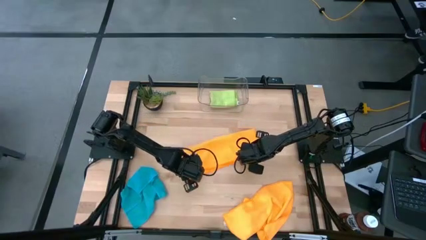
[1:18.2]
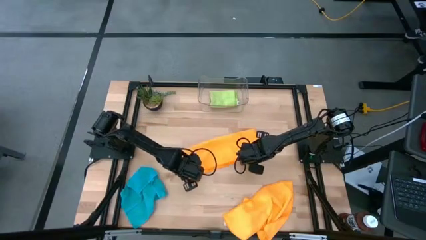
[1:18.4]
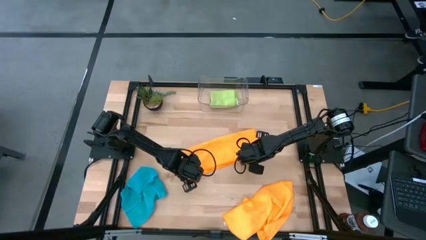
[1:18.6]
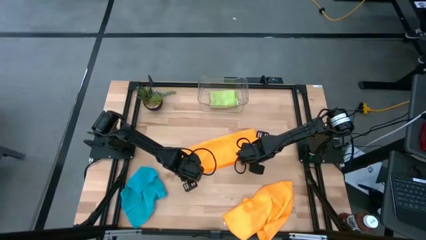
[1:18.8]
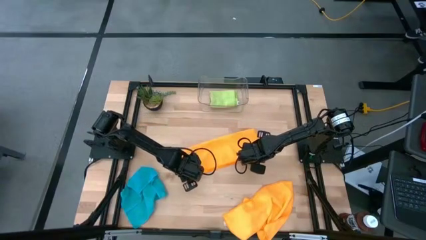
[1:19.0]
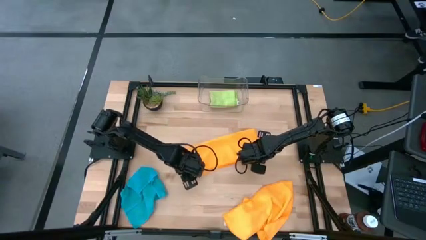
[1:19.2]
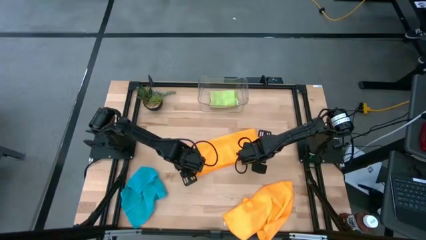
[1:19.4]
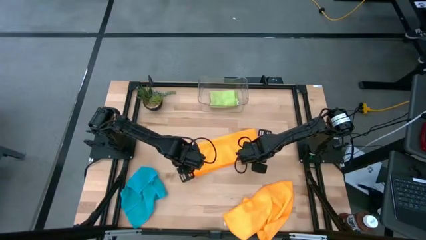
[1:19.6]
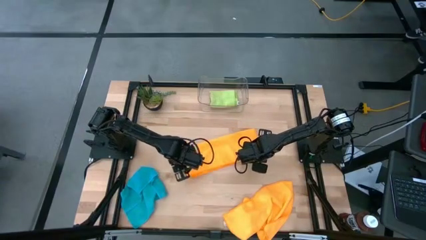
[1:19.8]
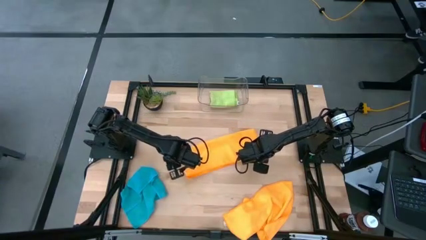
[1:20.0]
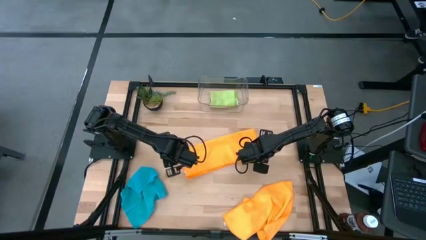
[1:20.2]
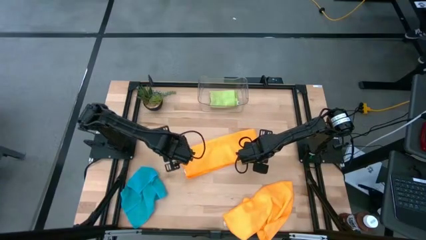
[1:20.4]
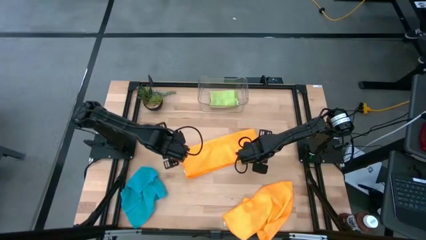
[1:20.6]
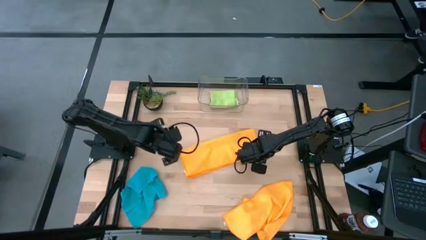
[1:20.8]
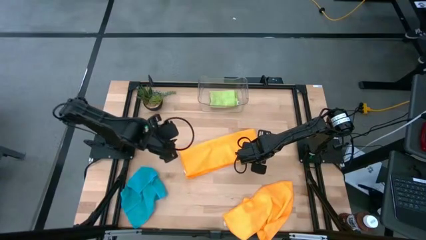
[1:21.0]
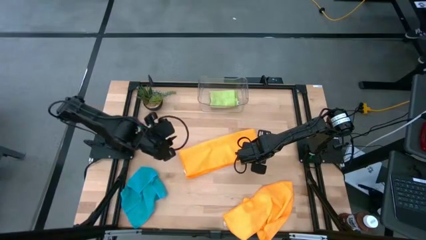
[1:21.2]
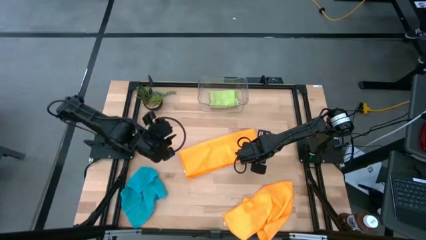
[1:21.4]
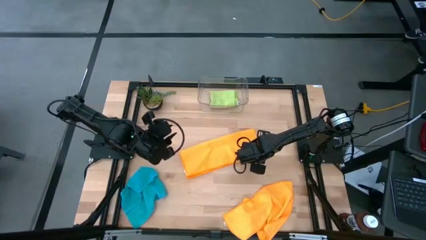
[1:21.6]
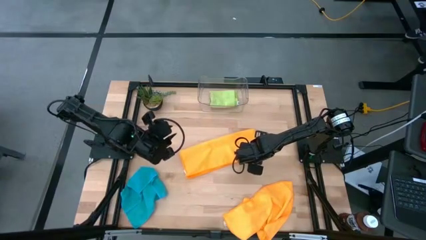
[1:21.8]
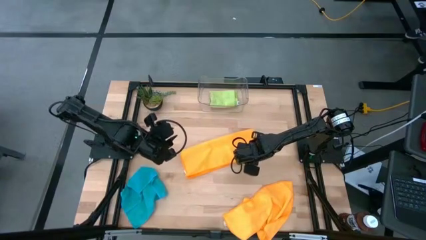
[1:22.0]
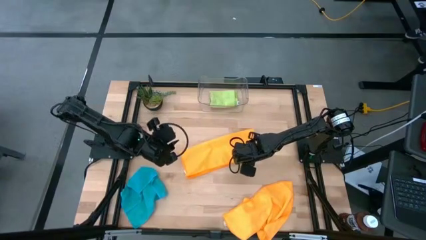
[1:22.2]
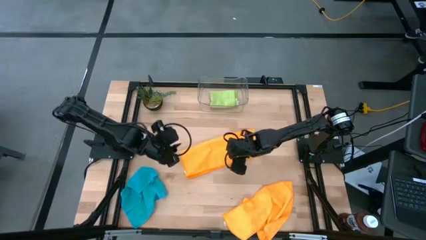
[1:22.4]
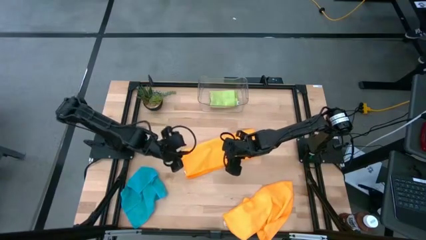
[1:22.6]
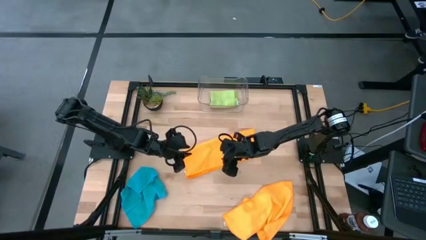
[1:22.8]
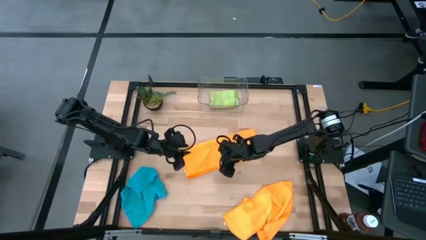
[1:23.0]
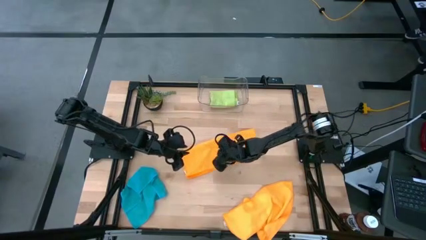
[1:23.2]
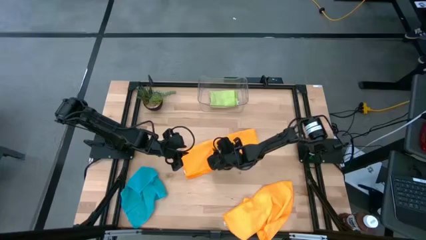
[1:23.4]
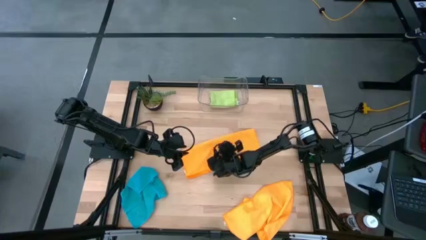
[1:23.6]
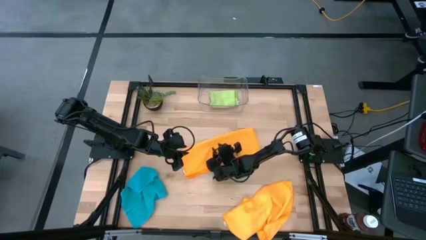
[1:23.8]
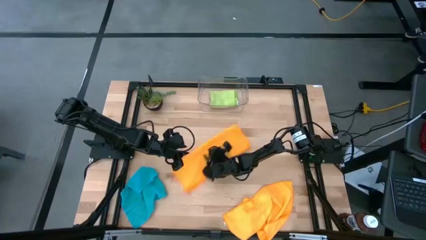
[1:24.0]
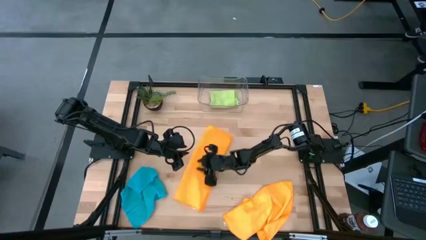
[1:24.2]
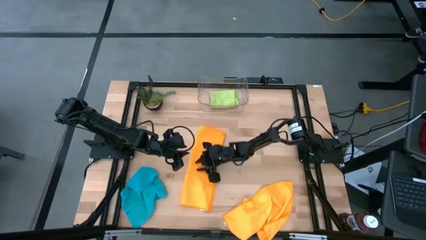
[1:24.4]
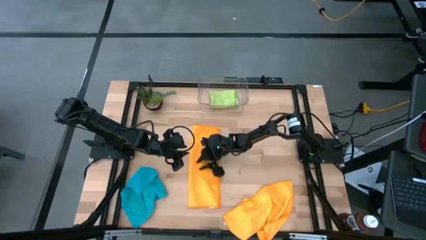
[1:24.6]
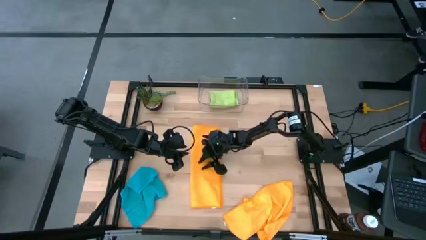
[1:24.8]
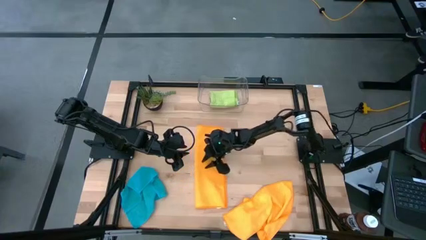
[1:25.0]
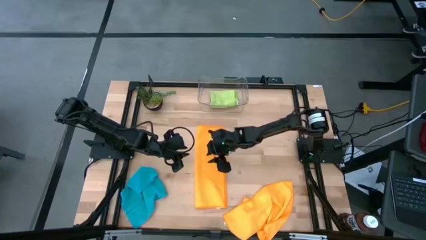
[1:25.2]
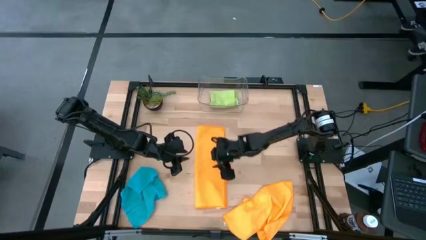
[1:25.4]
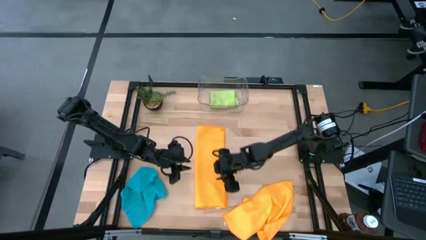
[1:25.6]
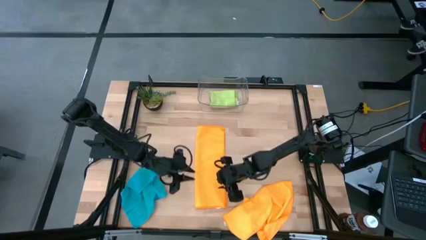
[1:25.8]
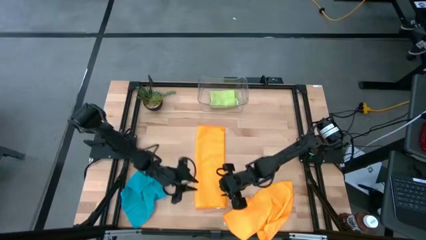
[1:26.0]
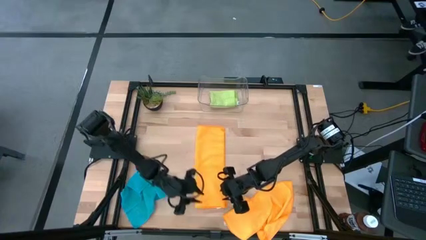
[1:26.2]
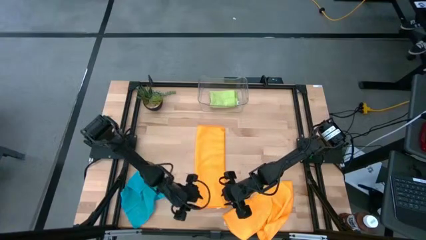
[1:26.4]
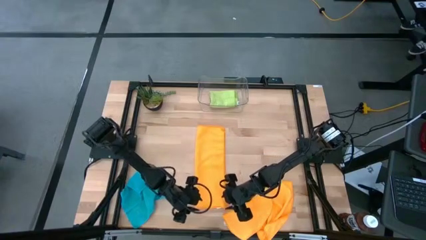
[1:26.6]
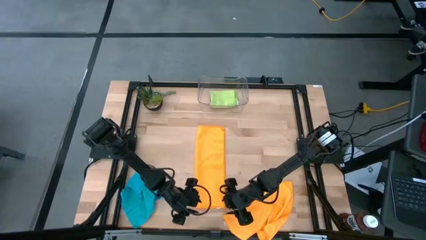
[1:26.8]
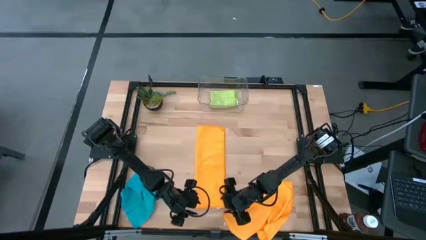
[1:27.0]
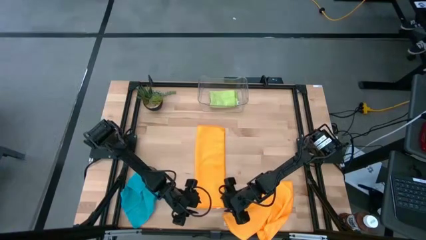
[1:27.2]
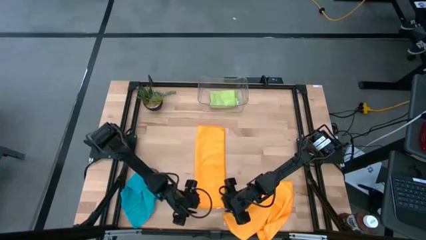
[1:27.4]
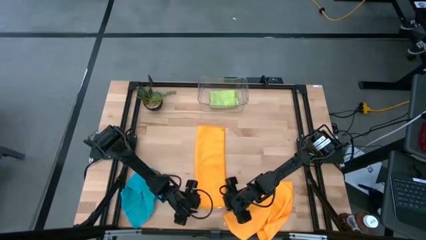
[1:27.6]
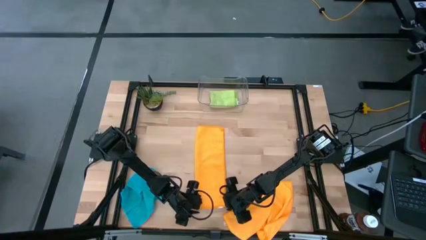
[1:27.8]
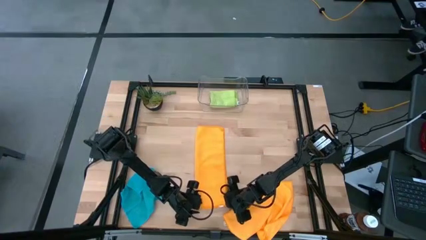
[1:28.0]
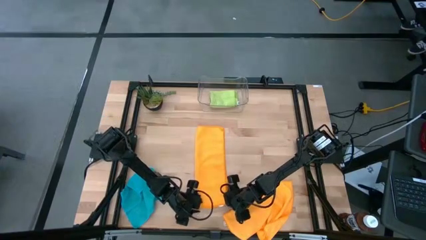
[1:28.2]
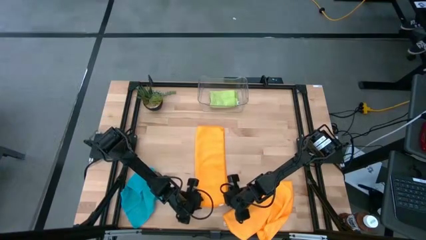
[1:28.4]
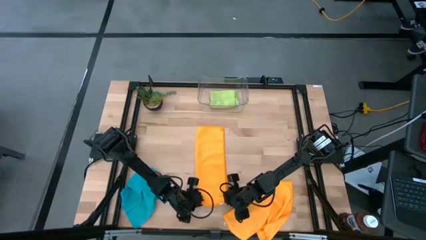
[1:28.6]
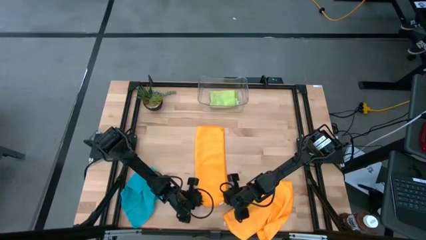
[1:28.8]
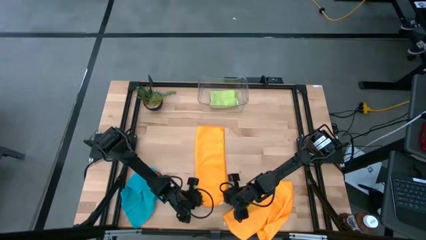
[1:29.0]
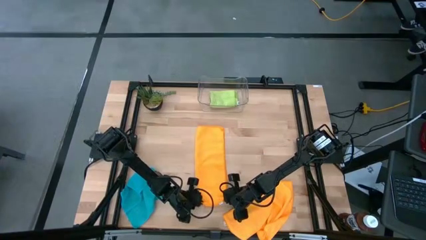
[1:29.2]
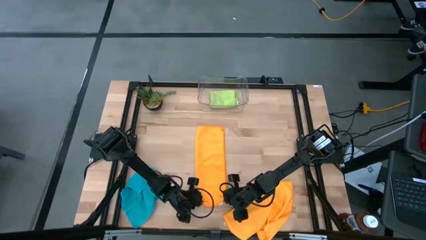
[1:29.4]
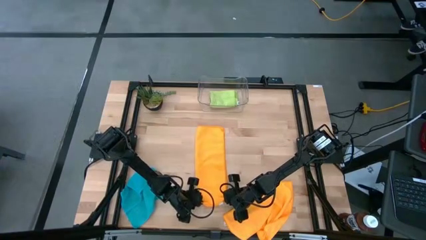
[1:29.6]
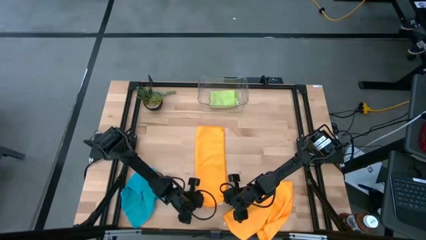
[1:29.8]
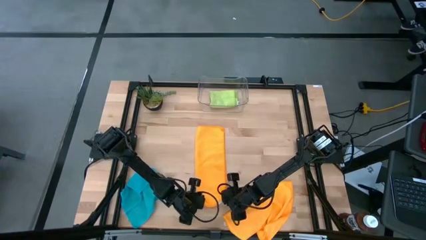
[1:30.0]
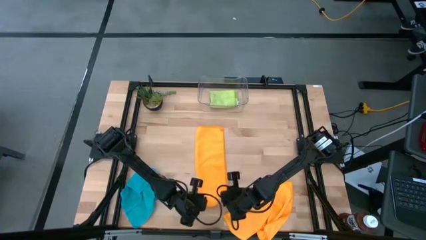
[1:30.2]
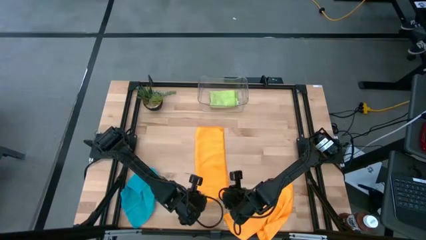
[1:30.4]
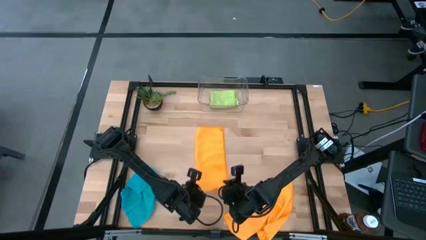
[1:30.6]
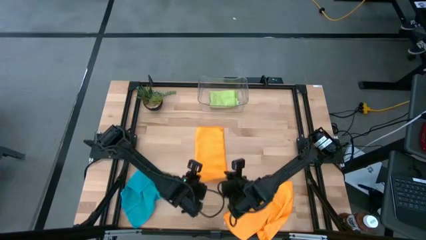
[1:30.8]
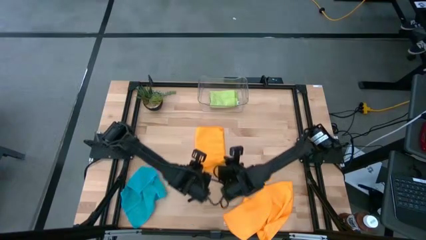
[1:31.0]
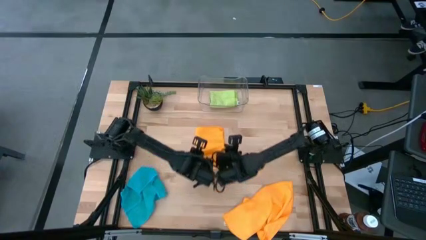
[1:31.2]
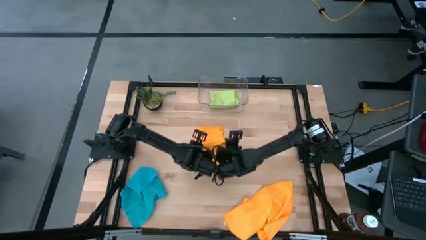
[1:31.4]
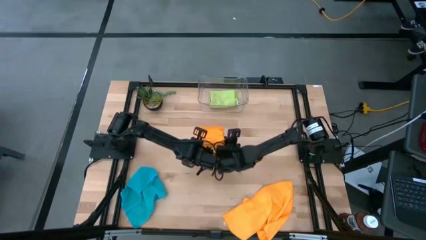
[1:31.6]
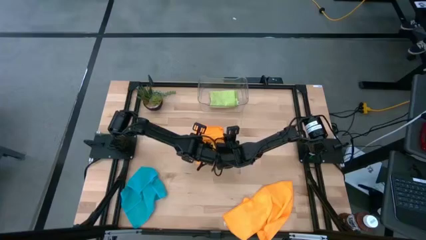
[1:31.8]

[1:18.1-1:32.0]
Task: Fold microfiber towels
Fold the top orange microfiber cloth
